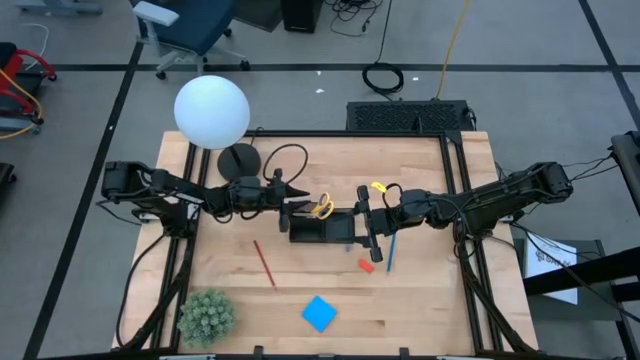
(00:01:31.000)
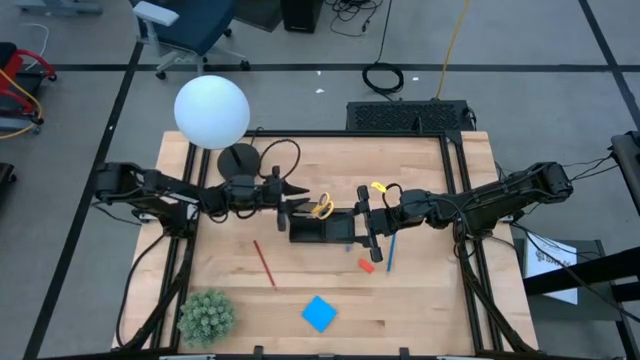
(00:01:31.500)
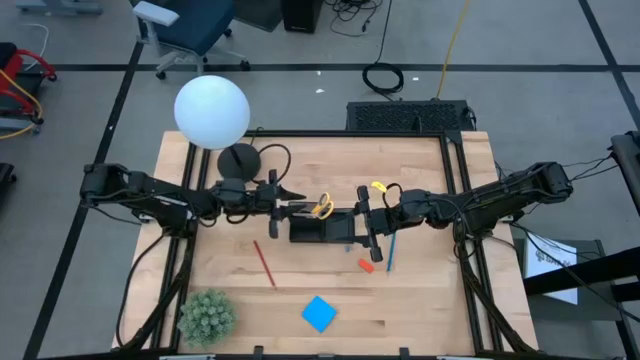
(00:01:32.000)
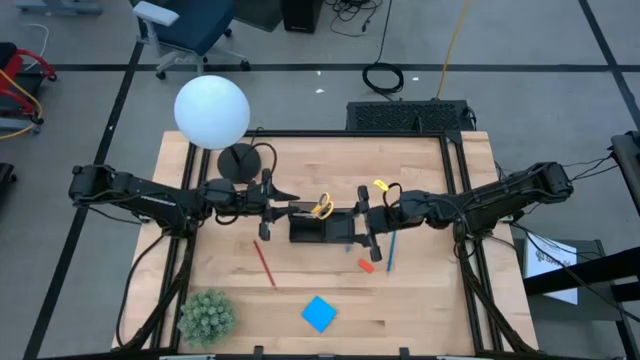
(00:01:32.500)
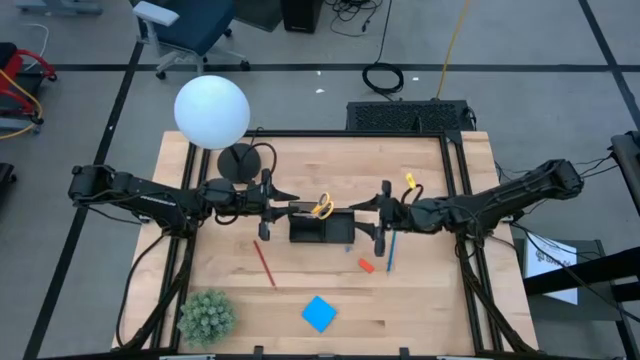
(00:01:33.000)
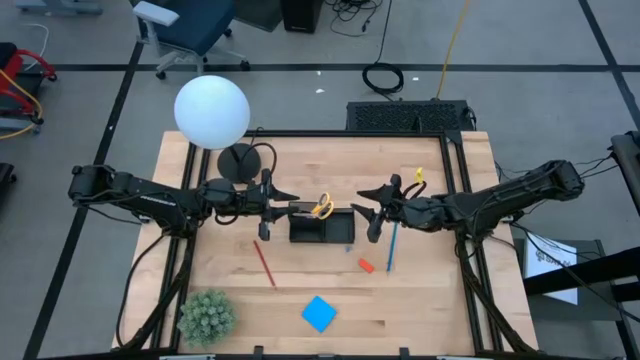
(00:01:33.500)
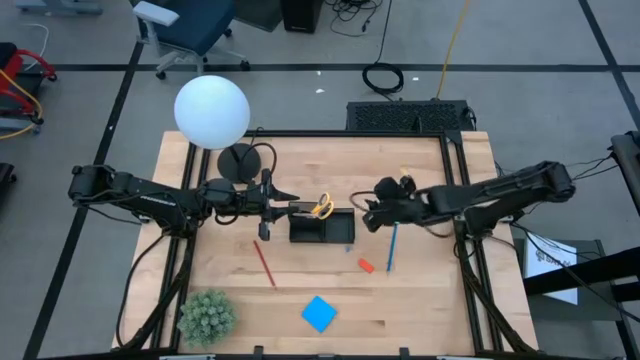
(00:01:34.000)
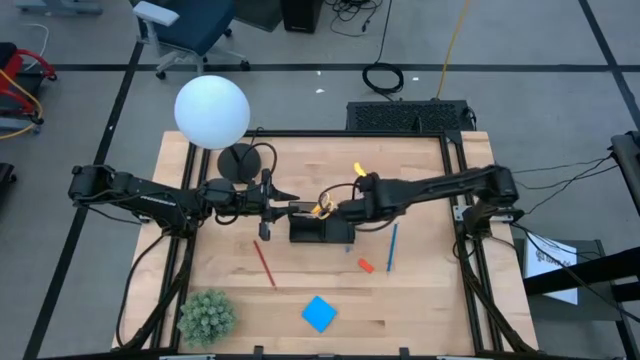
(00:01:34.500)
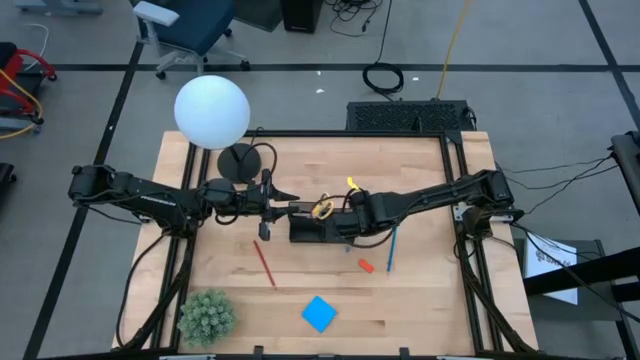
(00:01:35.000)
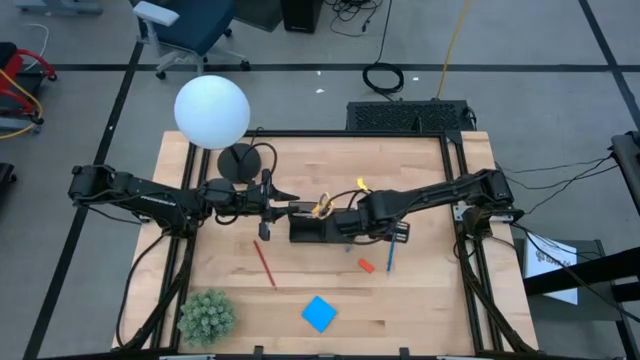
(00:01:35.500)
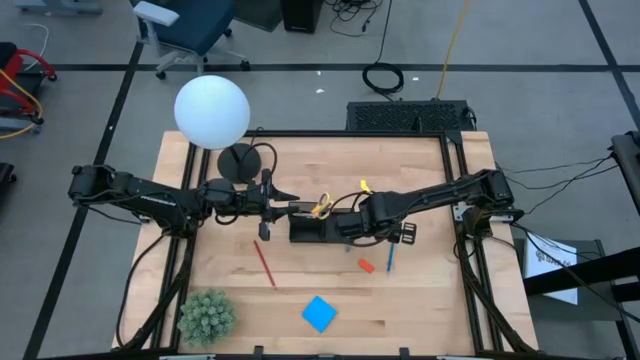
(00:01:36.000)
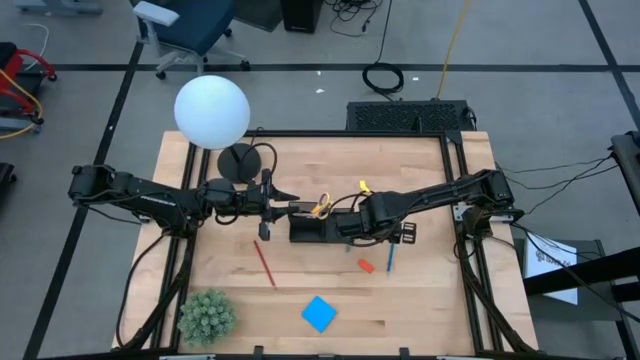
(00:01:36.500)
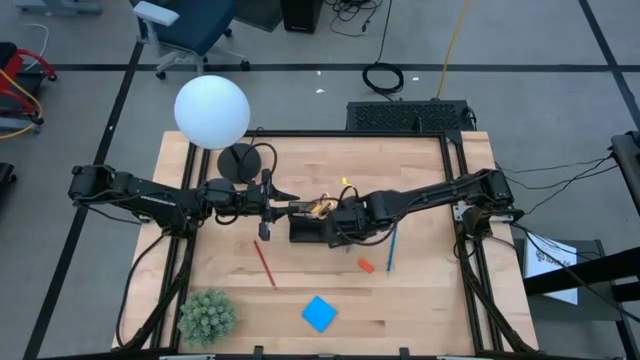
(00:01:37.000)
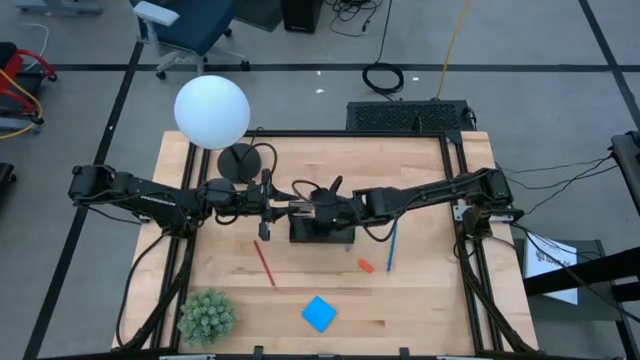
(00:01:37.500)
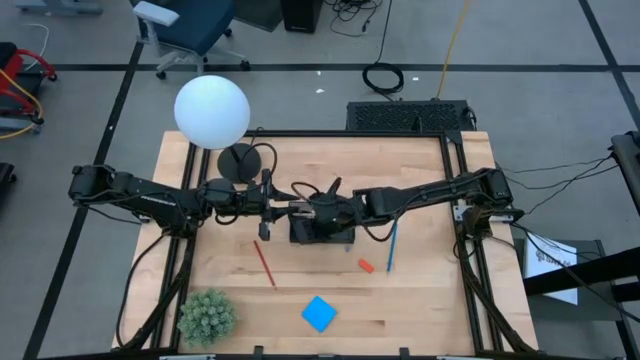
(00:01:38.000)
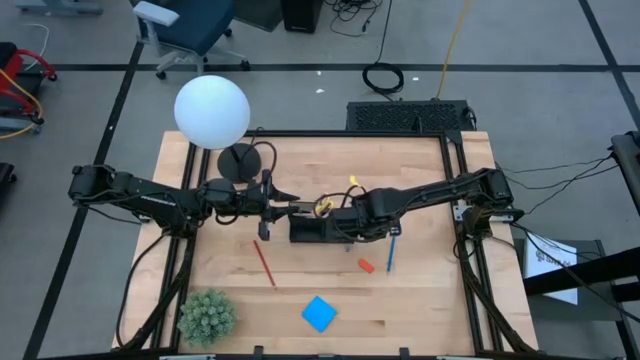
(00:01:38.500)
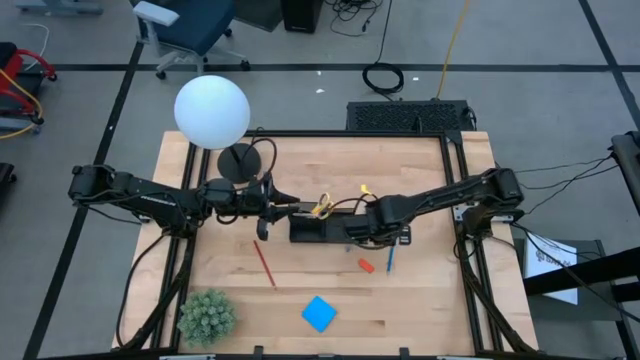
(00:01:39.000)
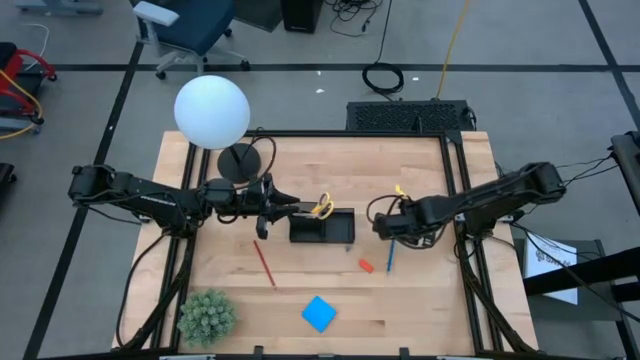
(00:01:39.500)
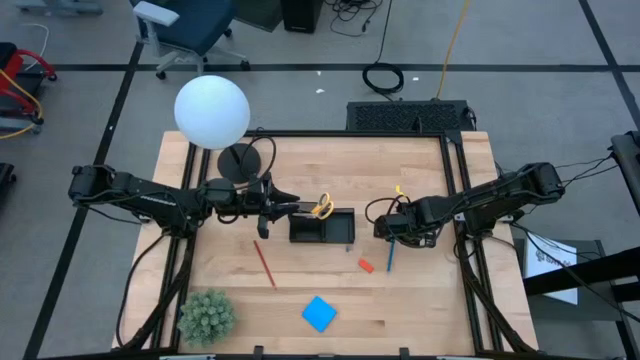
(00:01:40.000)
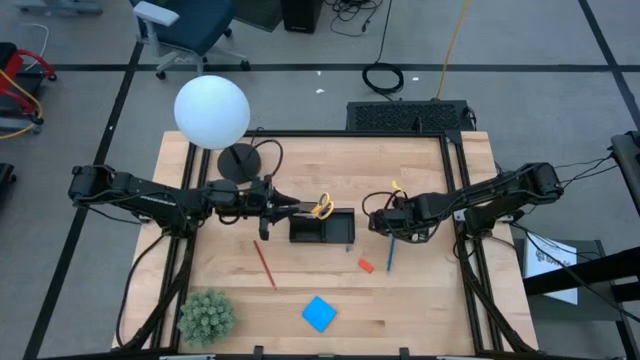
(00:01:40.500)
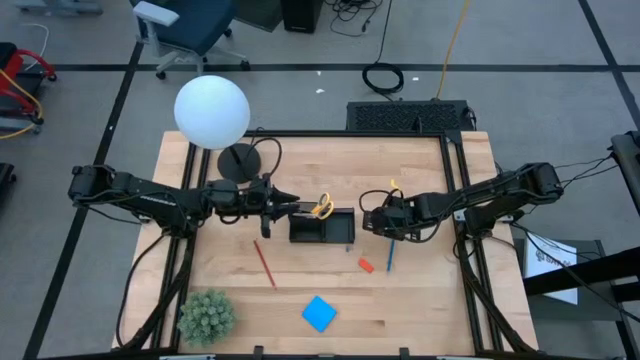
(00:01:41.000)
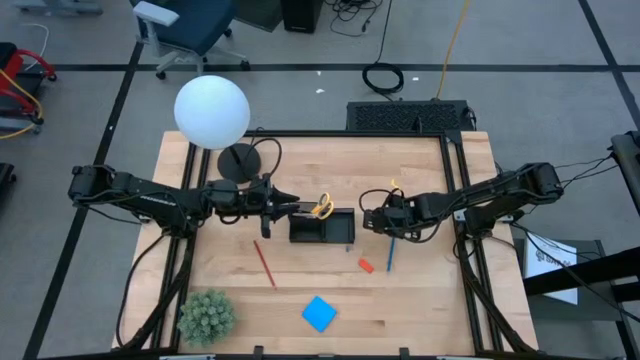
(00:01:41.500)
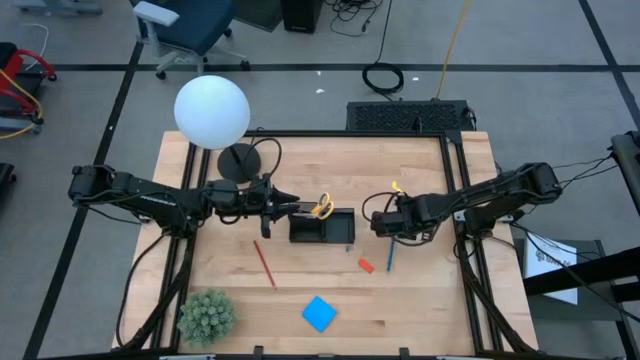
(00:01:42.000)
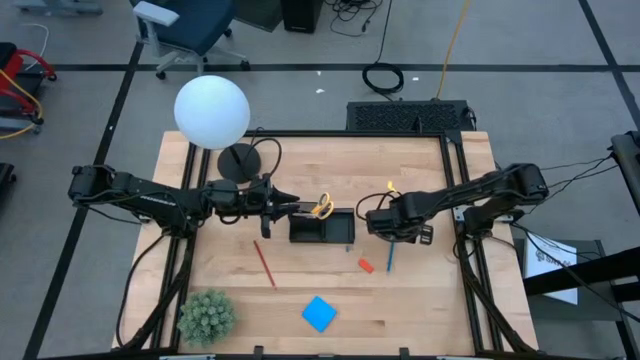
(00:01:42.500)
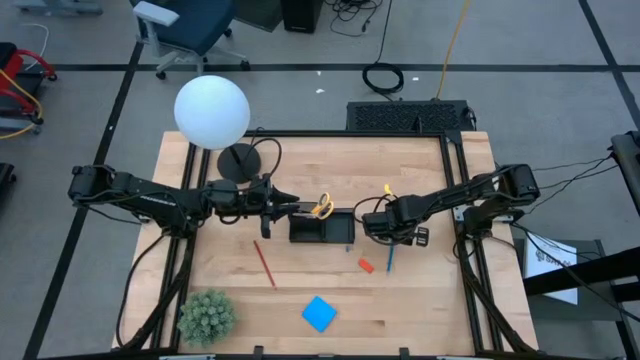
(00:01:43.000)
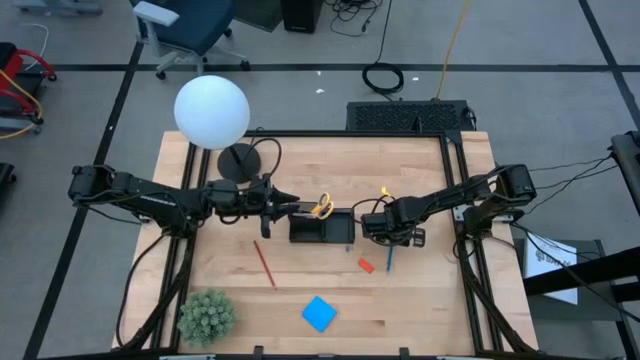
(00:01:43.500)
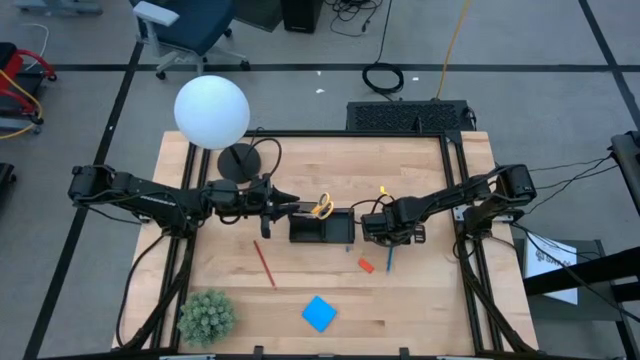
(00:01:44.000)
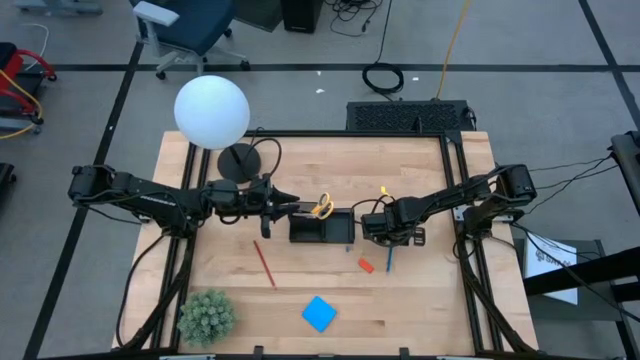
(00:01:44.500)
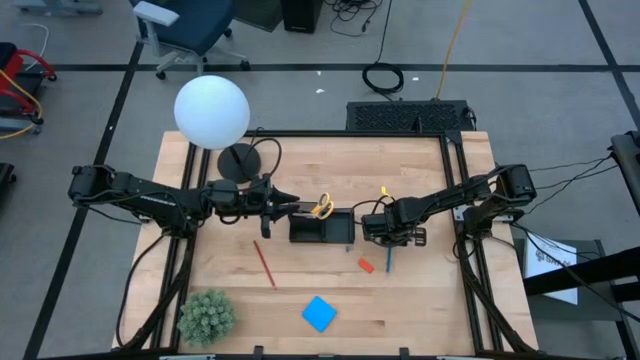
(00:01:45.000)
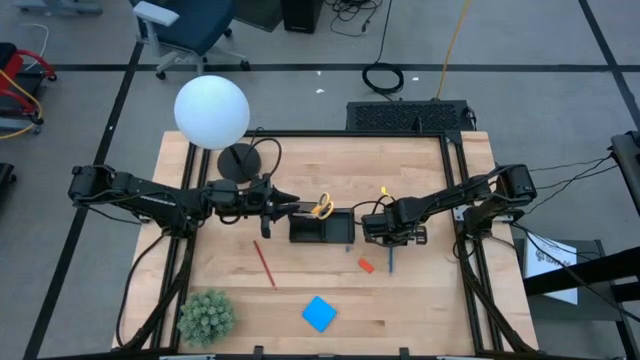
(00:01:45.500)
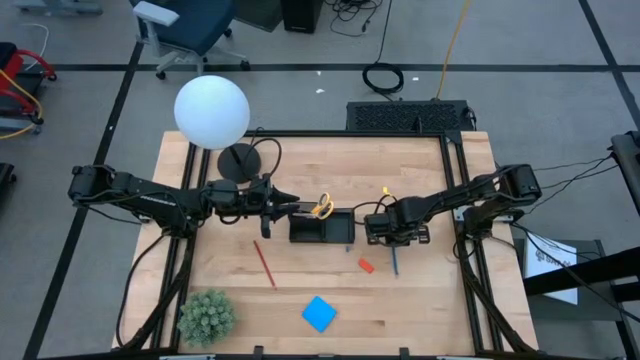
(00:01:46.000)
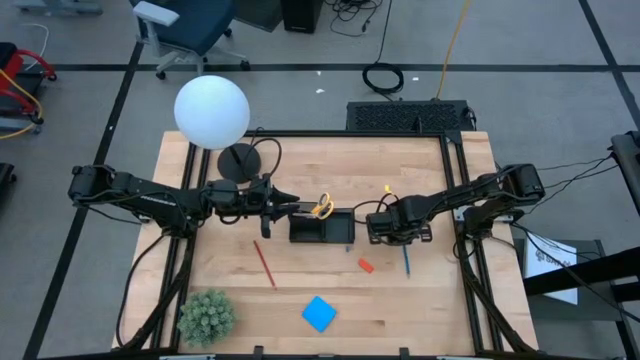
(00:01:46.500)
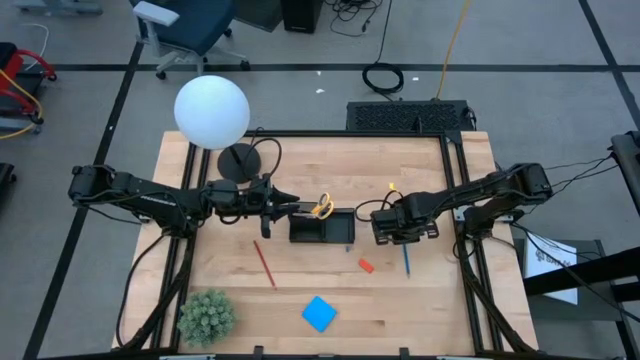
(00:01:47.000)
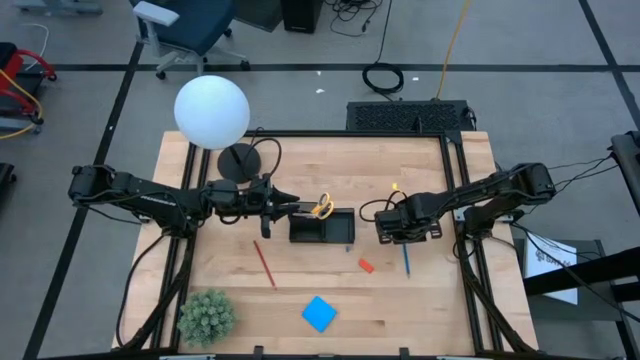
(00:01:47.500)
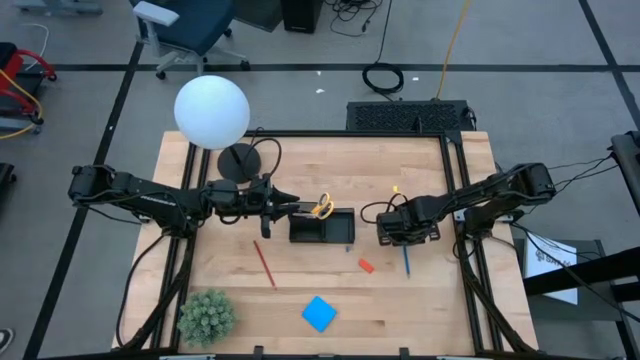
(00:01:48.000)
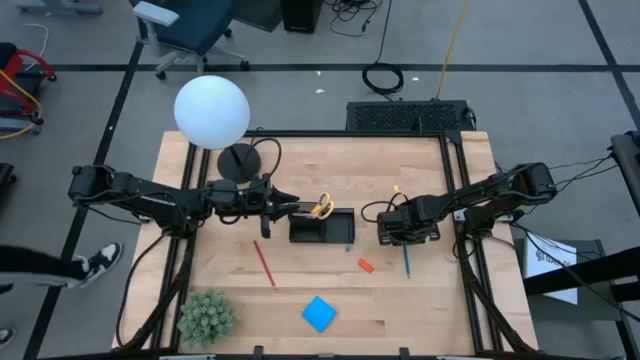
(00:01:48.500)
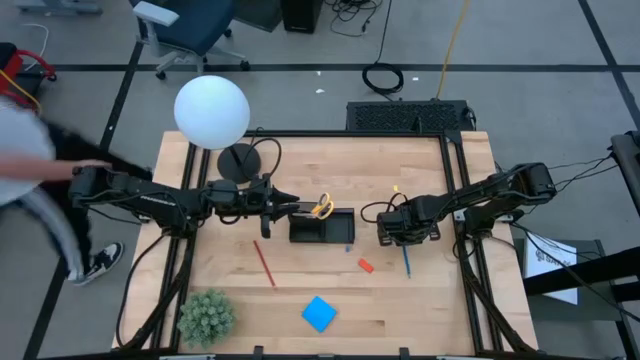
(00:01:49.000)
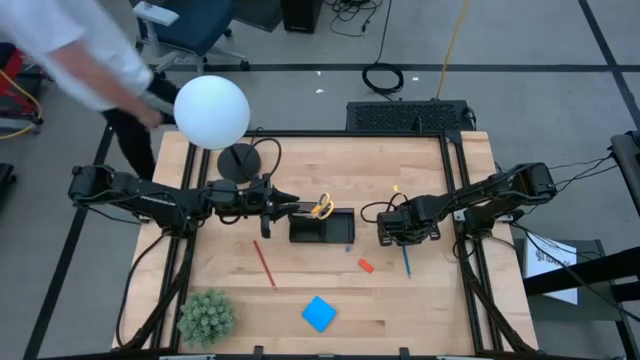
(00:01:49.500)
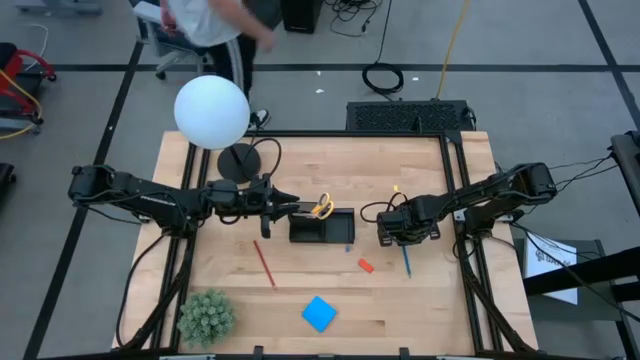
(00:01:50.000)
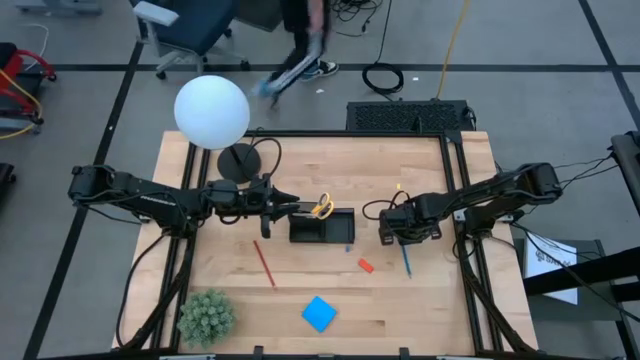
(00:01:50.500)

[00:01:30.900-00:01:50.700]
Task: Pick and place office supplies into organizer
Put the blue pencil into the desk organizer
